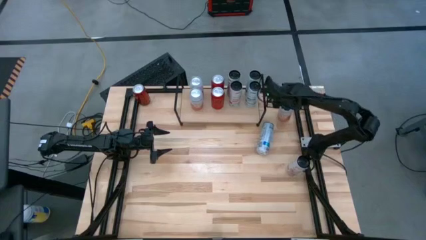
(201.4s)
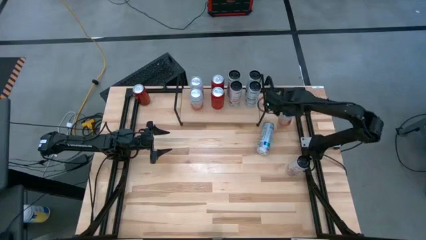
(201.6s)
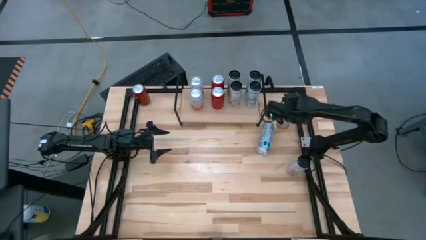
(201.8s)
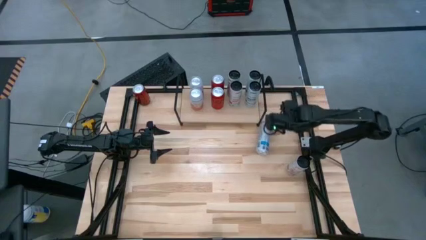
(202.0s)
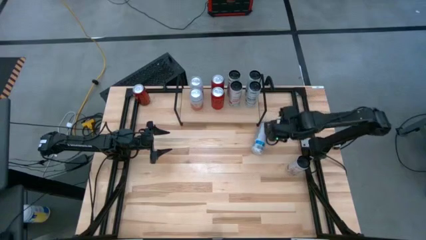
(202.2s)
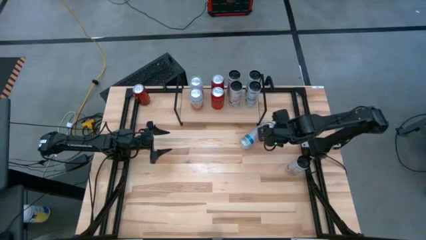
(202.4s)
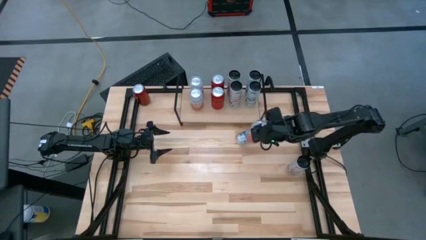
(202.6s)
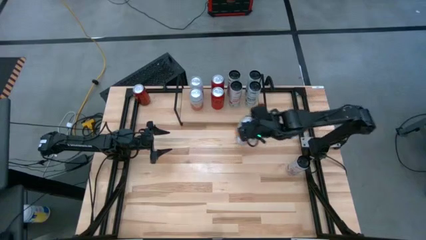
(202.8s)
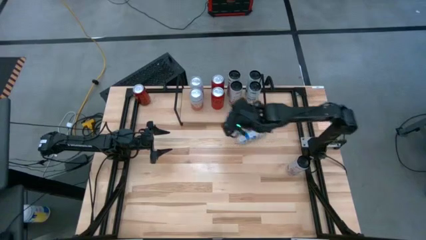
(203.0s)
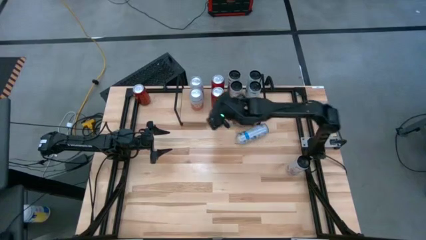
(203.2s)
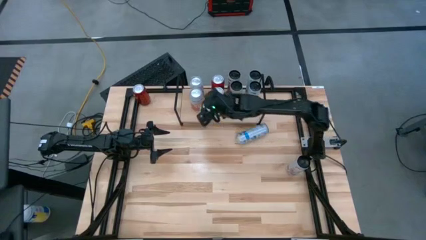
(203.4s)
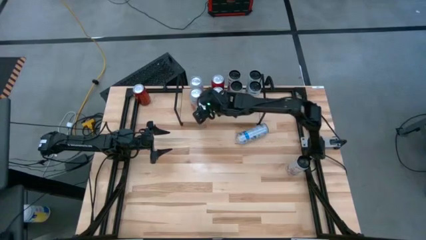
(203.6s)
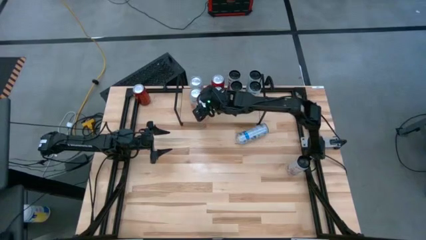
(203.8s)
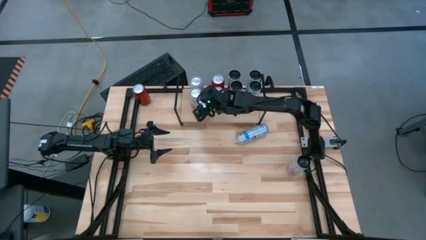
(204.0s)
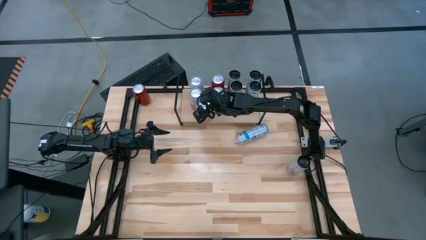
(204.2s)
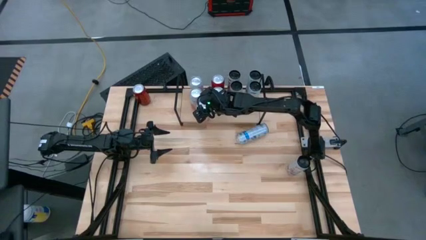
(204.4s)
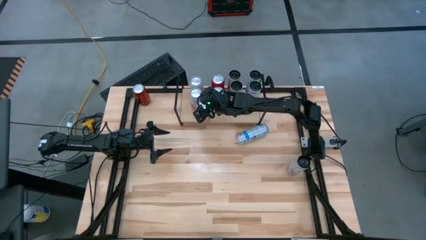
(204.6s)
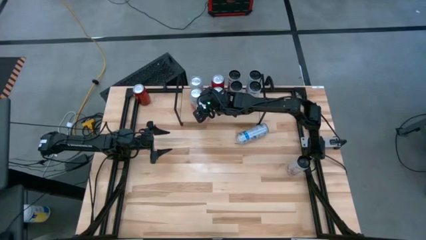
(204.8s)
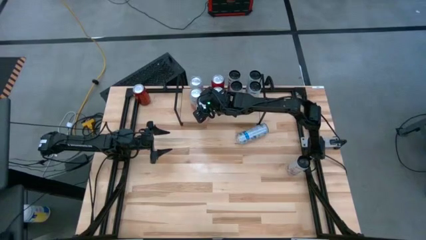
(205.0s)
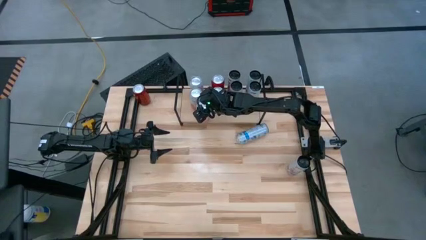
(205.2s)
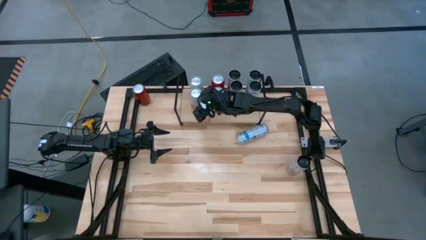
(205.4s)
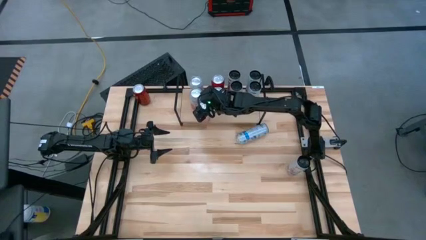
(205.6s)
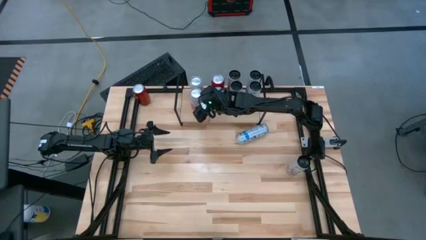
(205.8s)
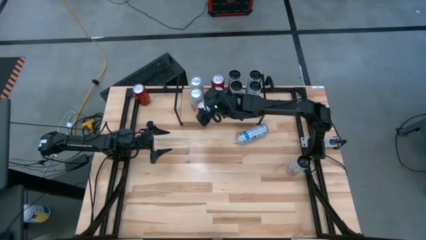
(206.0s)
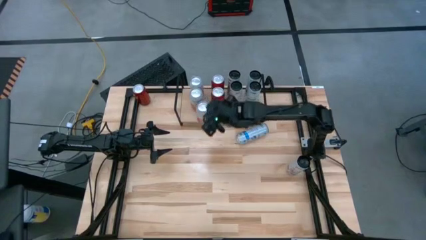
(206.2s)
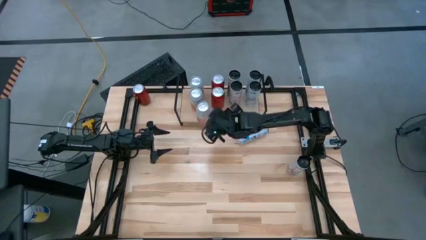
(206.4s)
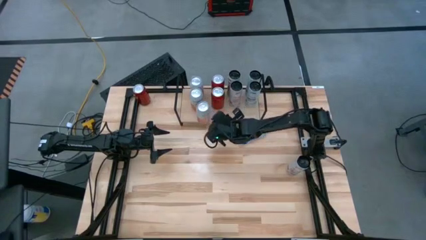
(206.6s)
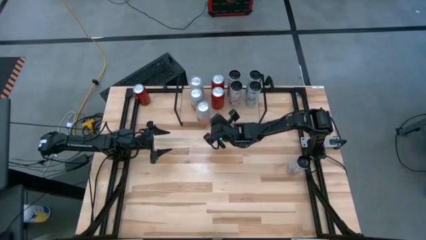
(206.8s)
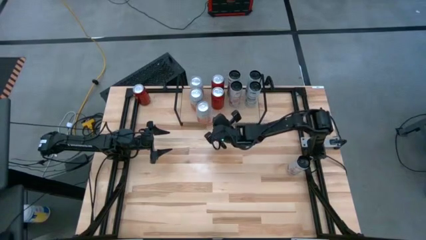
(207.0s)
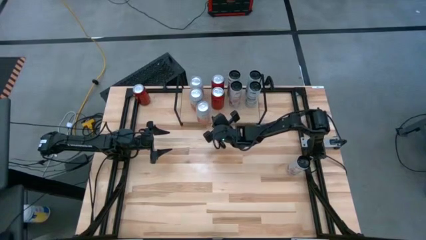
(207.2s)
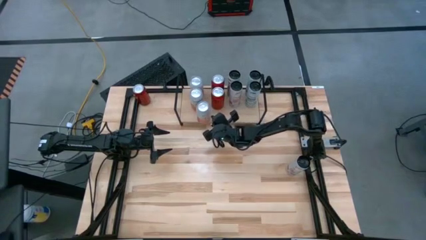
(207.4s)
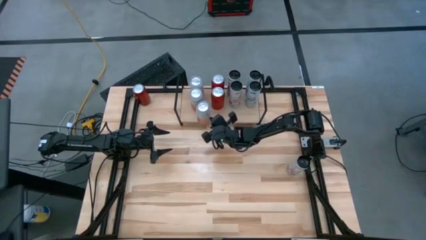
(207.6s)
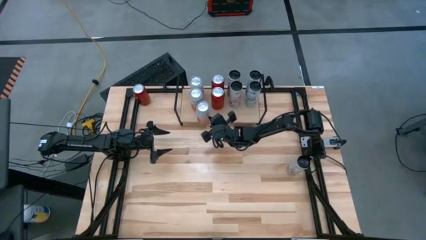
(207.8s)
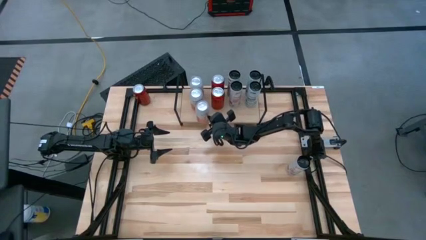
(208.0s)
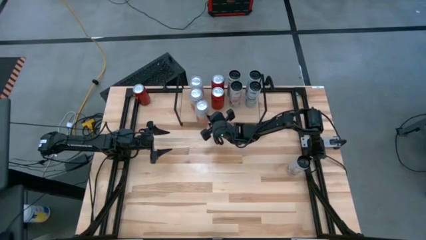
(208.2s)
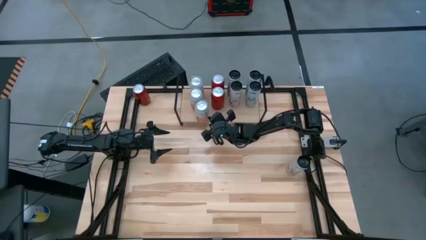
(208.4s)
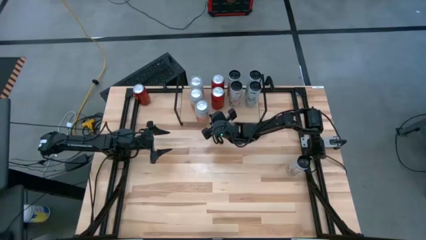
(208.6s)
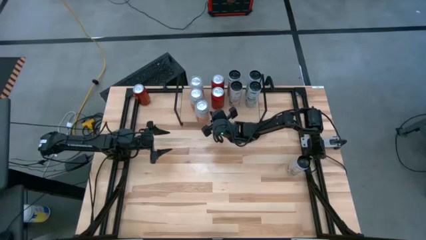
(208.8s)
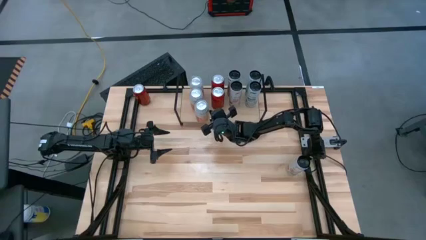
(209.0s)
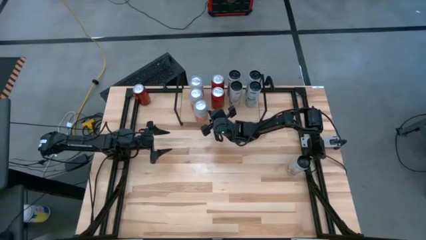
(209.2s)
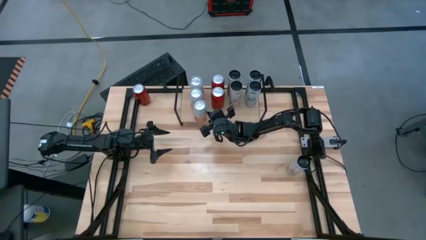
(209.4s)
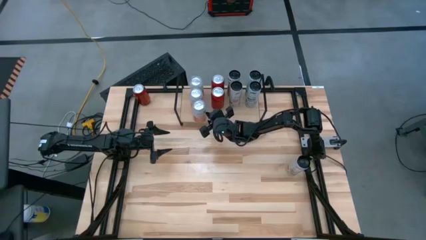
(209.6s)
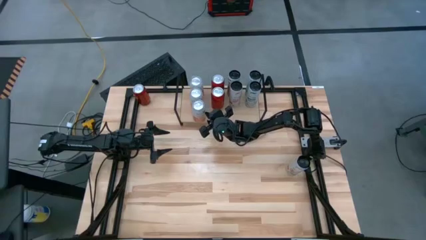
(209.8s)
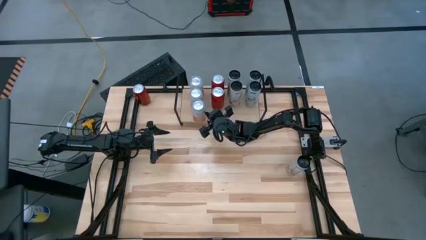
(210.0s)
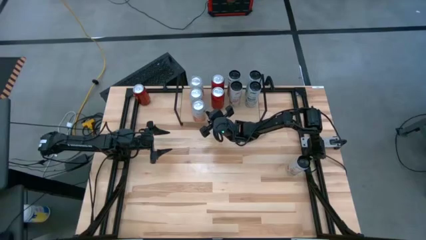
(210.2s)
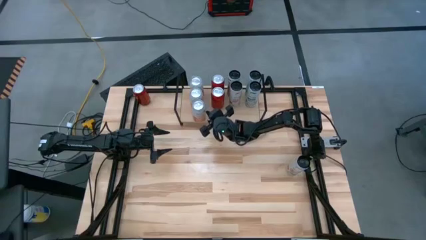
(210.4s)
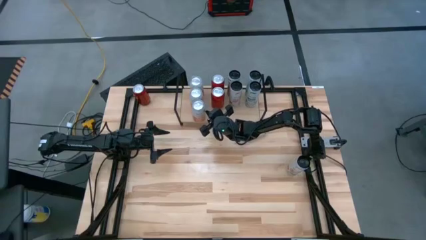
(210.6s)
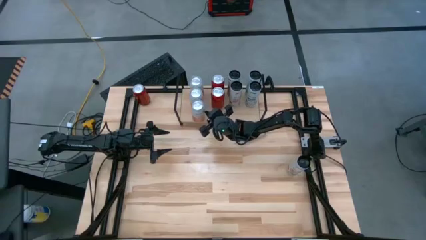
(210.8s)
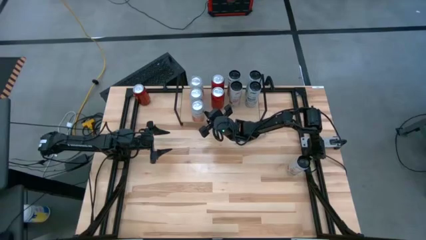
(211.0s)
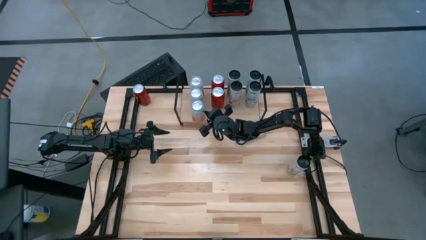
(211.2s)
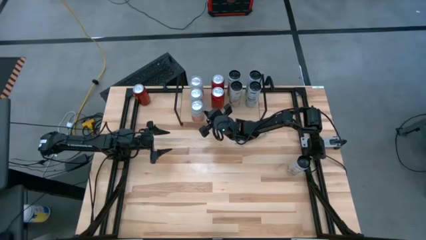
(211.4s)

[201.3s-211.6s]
Task: Place canned beverage on shelf
Put the orange white soda can on the shelf aligned with the other orange white soda can

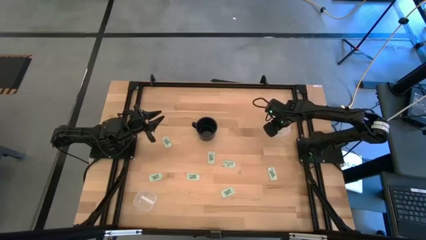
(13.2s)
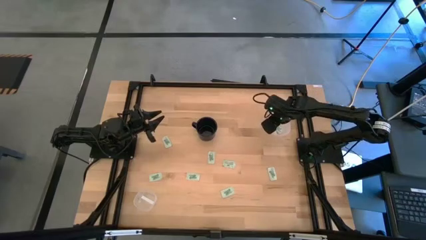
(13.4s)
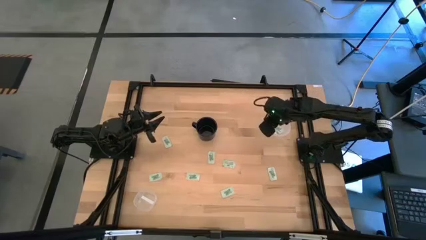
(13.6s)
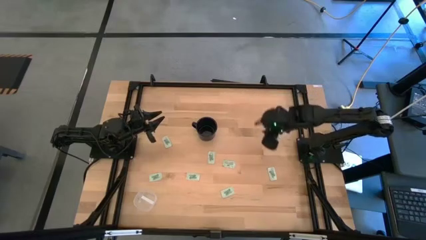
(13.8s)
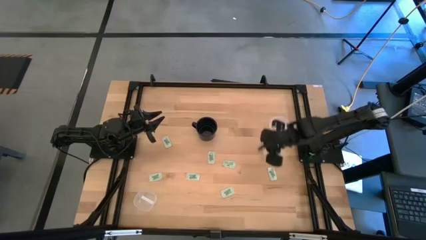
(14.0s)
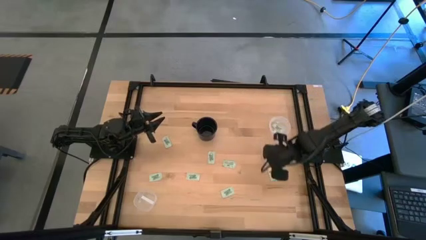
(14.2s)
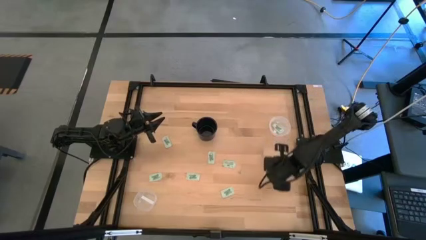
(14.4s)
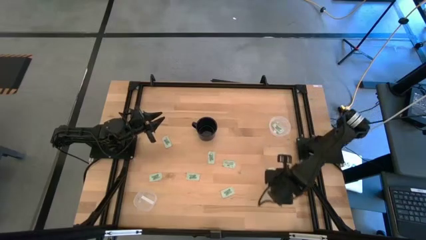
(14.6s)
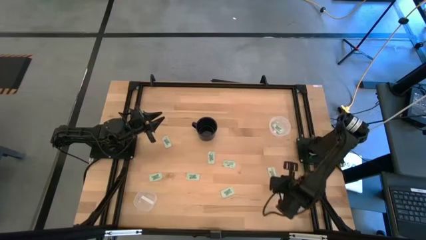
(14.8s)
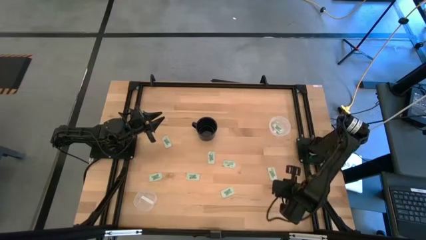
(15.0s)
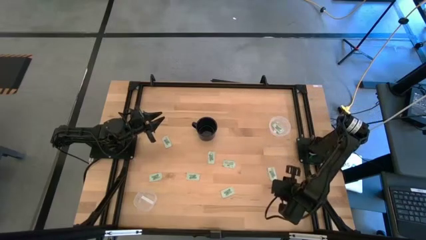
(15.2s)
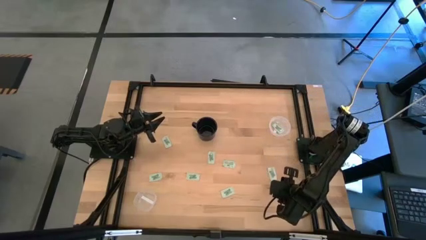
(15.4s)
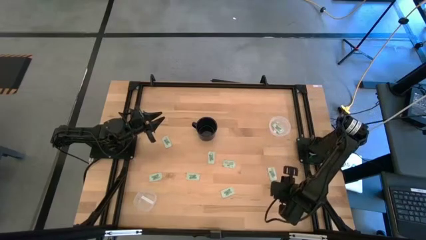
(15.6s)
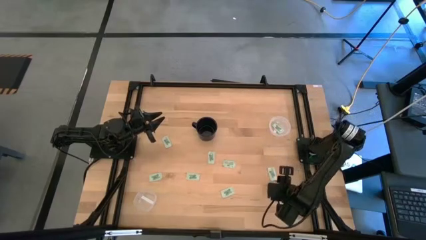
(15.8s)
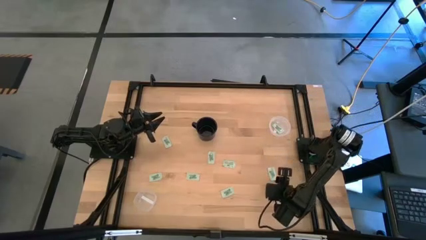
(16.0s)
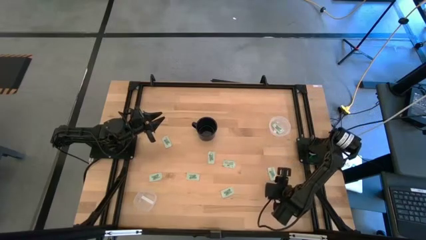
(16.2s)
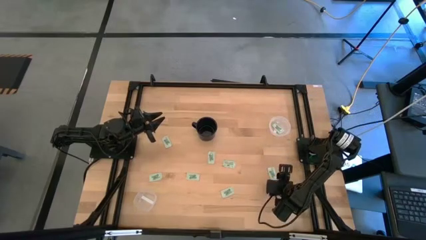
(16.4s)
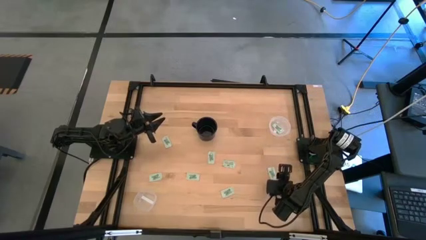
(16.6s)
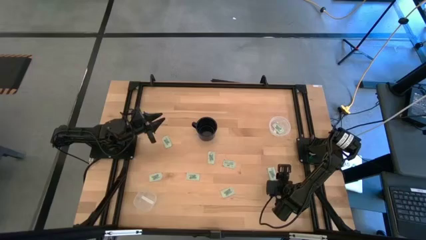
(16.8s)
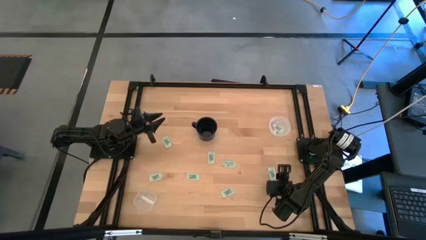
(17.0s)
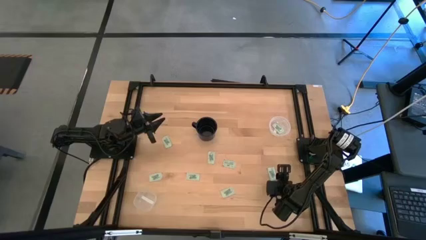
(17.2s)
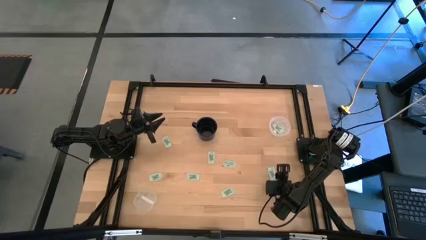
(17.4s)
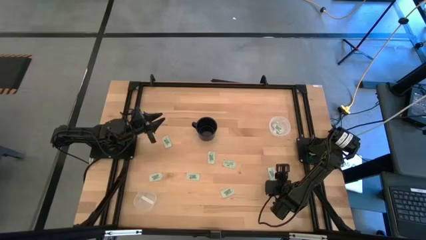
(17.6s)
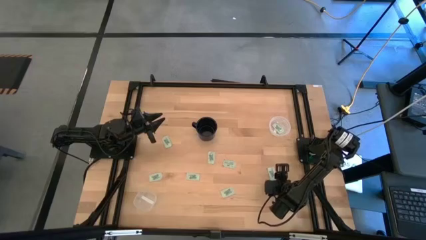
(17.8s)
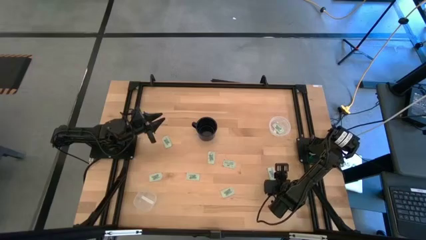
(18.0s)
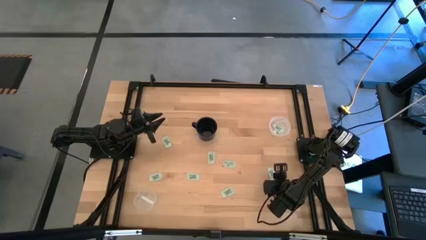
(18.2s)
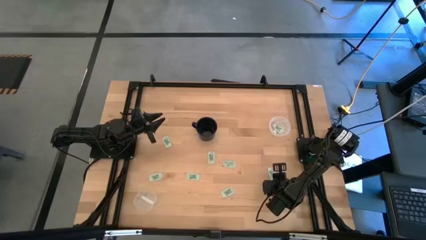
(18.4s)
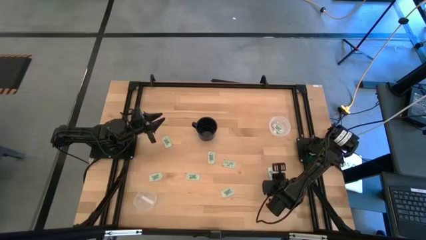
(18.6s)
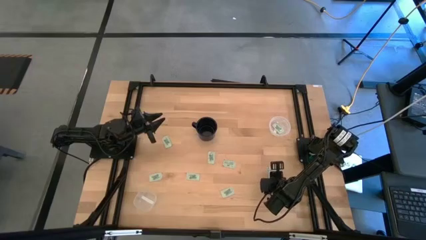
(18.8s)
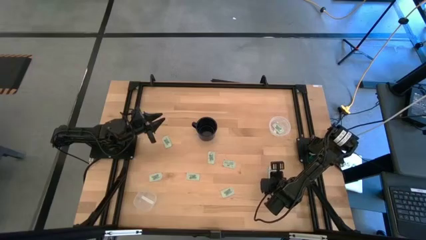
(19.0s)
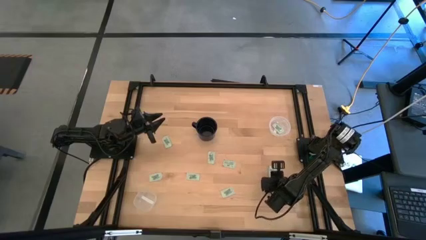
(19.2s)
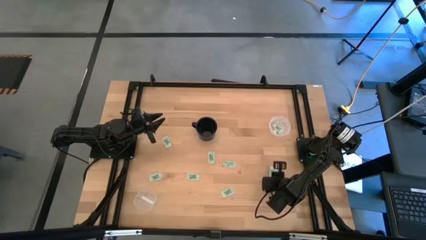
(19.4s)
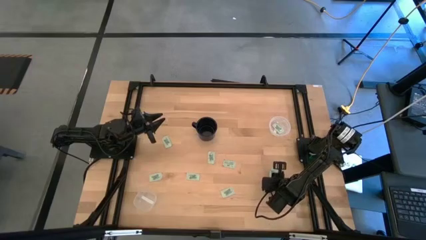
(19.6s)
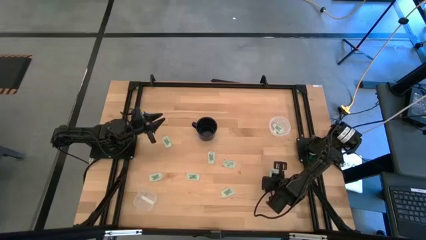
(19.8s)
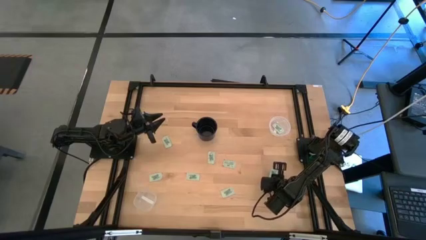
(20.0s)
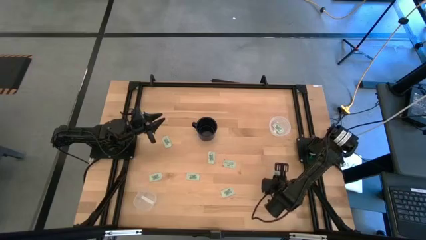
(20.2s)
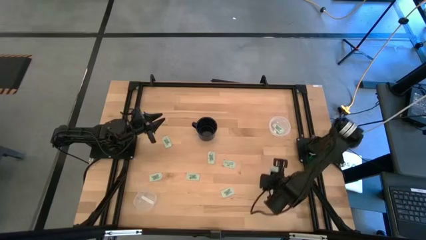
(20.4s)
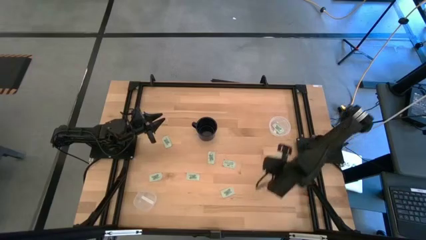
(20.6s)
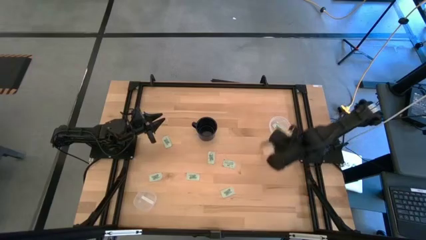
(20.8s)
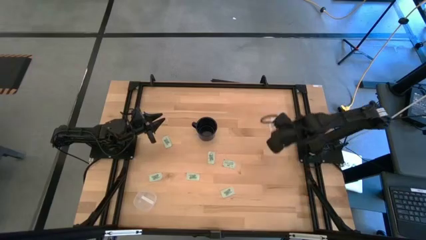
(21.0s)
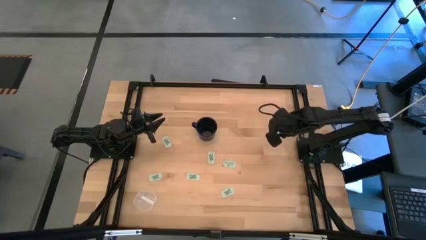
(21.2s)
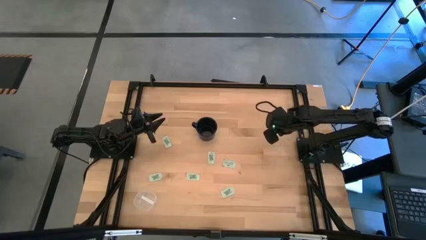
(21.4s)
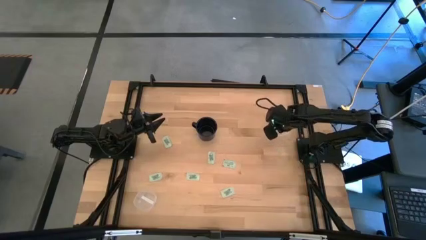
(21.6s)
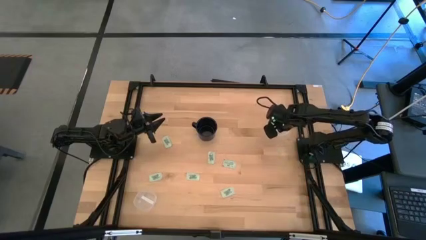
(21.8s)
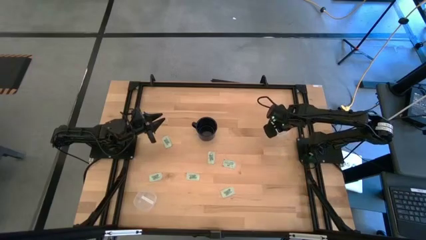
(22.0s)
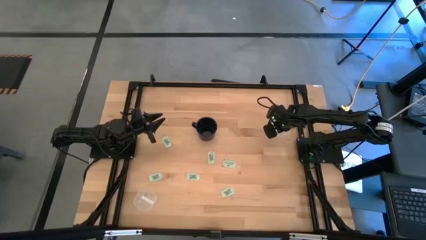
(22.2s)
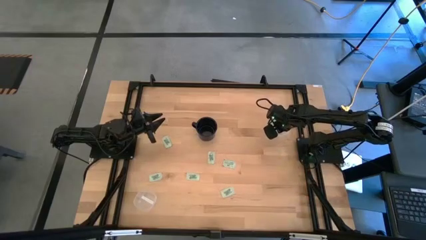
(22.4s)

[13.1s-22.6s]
Task: Pick and place Stevia / Truvia into bins
Put the stevia packet into the round transparent container
